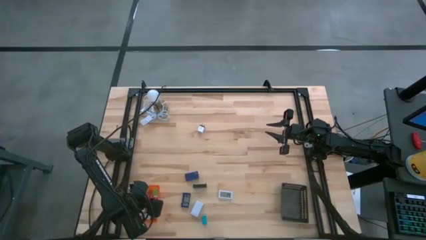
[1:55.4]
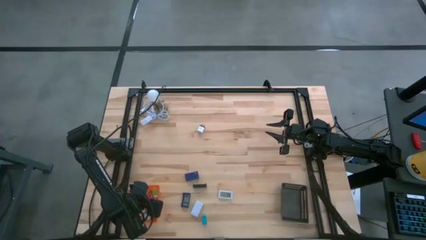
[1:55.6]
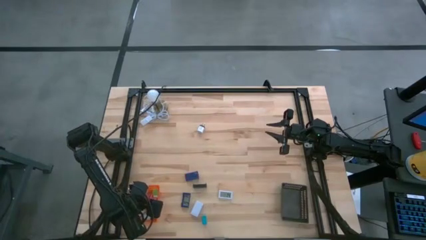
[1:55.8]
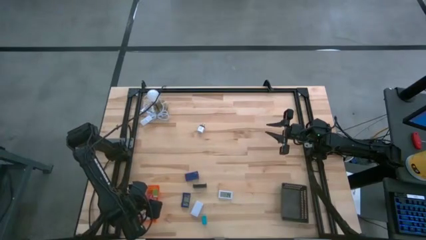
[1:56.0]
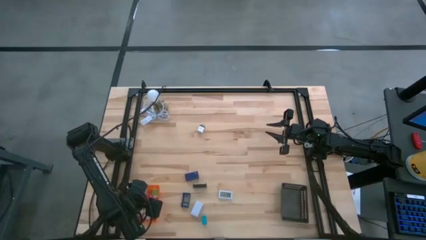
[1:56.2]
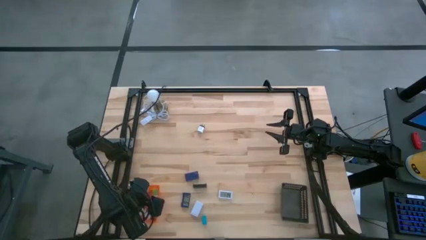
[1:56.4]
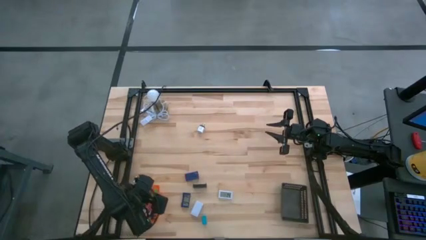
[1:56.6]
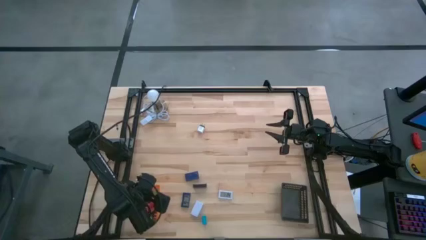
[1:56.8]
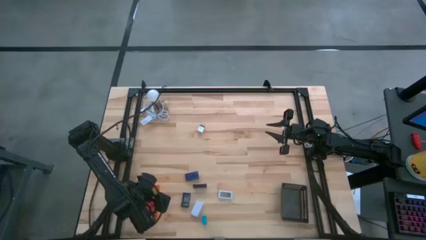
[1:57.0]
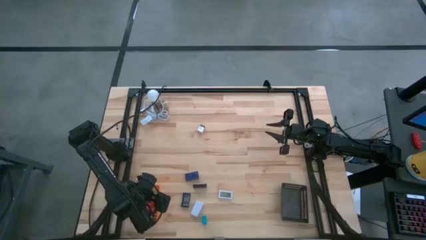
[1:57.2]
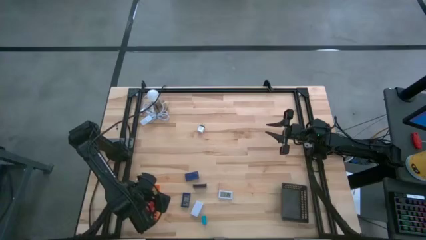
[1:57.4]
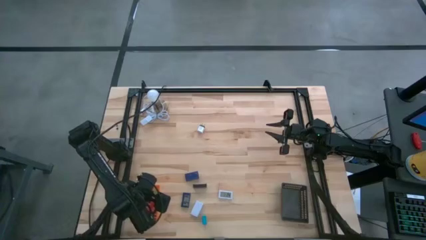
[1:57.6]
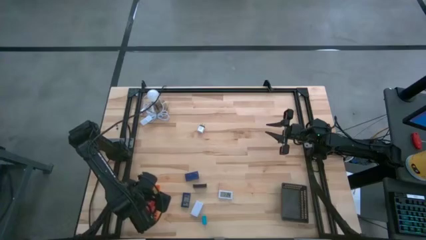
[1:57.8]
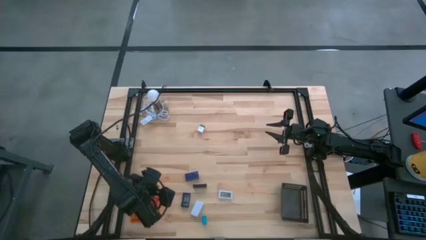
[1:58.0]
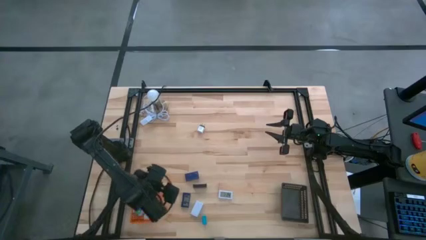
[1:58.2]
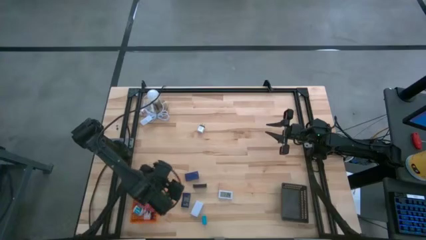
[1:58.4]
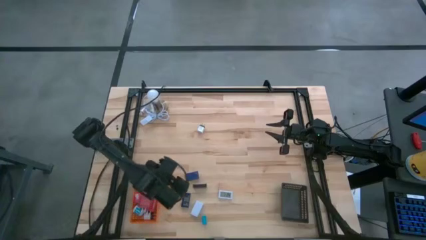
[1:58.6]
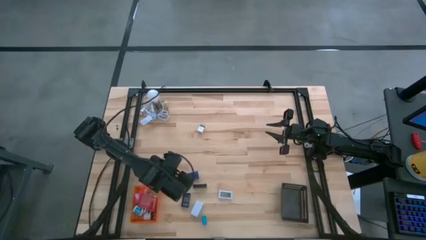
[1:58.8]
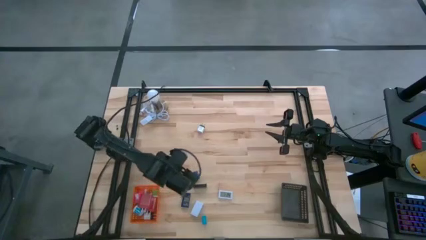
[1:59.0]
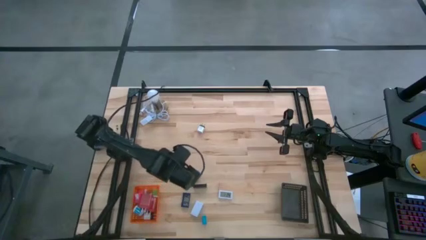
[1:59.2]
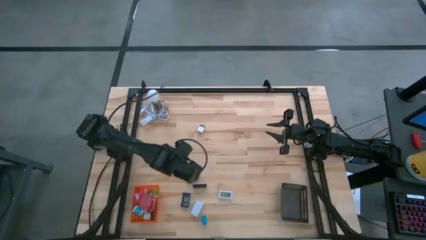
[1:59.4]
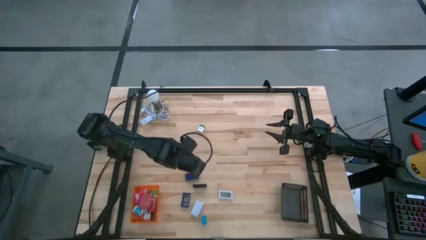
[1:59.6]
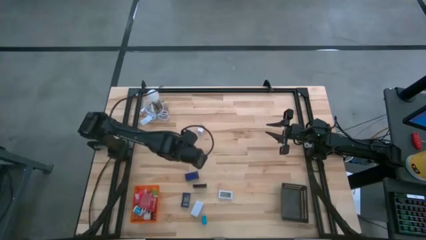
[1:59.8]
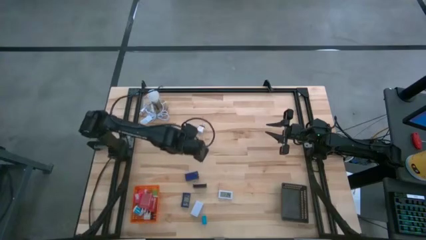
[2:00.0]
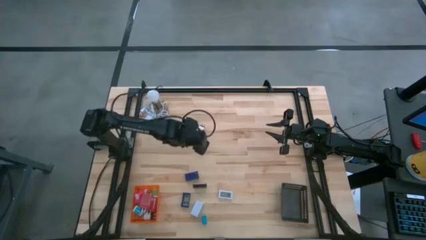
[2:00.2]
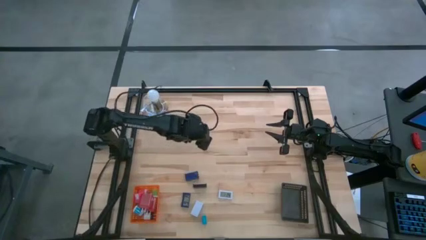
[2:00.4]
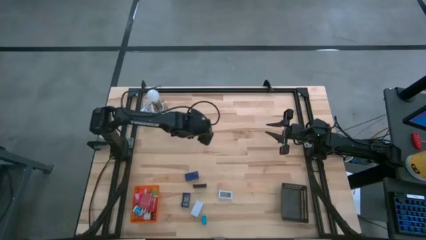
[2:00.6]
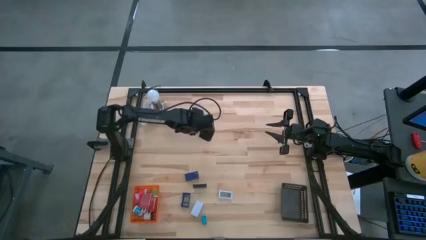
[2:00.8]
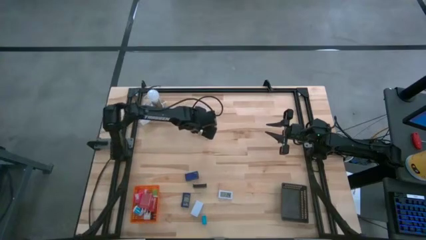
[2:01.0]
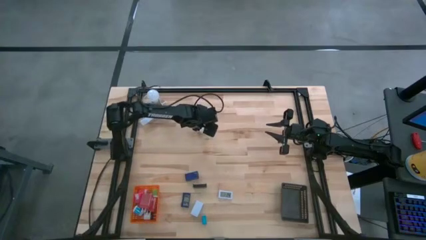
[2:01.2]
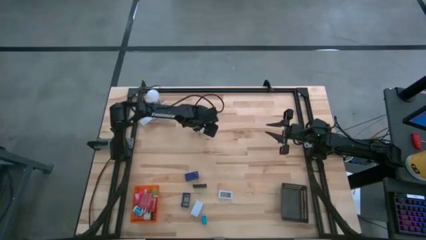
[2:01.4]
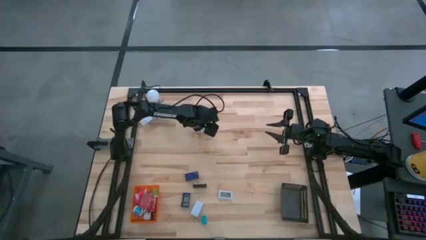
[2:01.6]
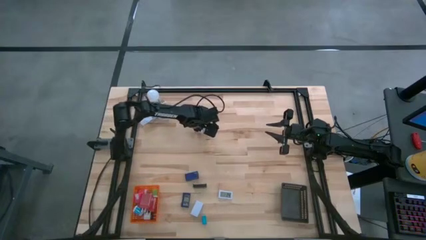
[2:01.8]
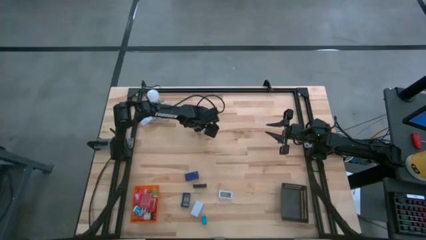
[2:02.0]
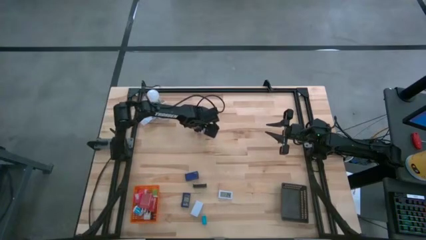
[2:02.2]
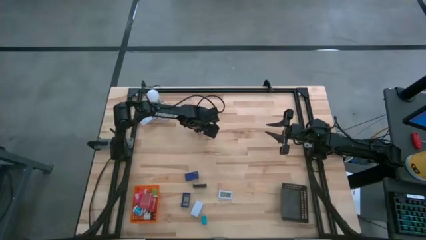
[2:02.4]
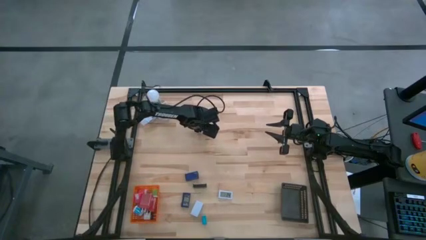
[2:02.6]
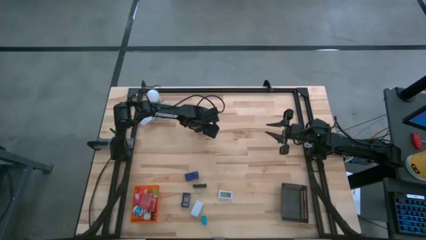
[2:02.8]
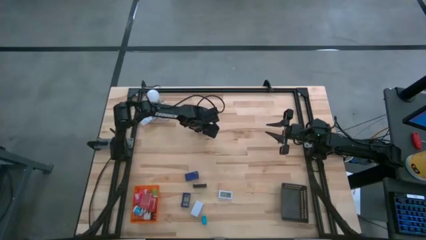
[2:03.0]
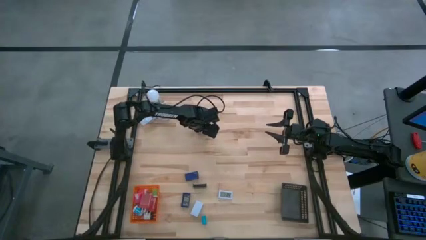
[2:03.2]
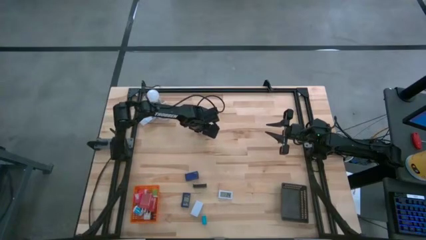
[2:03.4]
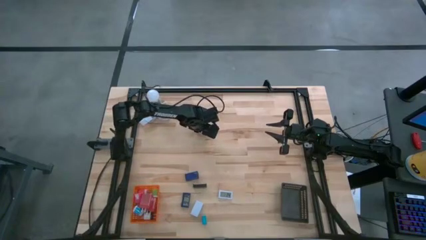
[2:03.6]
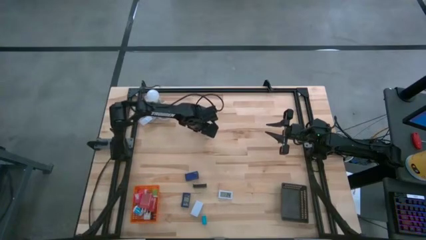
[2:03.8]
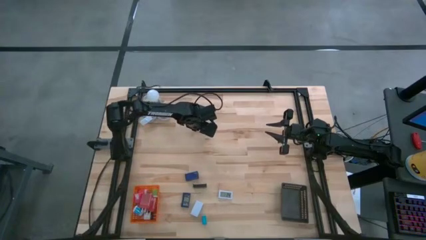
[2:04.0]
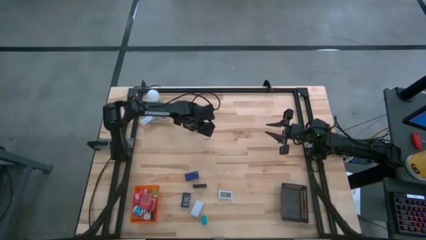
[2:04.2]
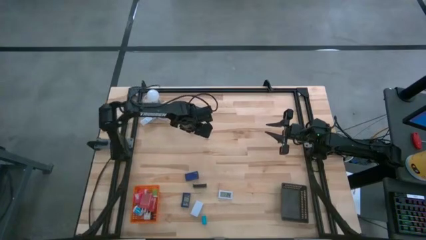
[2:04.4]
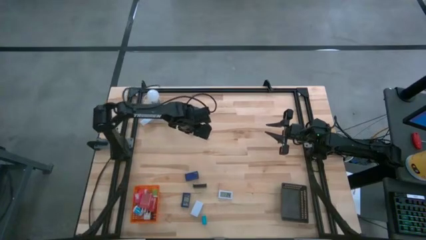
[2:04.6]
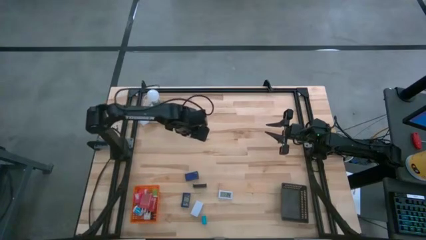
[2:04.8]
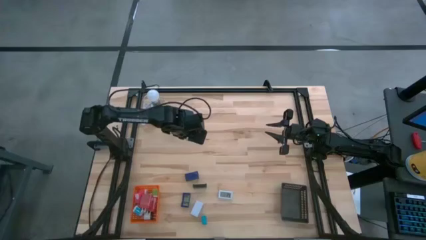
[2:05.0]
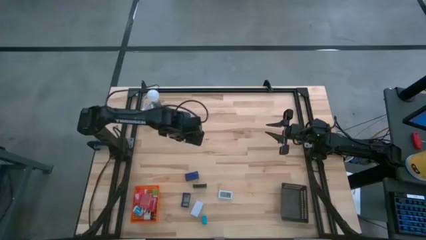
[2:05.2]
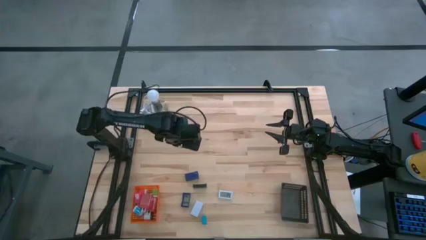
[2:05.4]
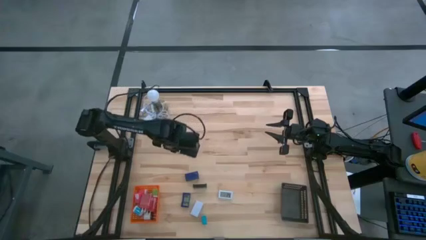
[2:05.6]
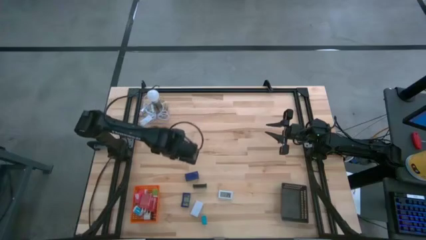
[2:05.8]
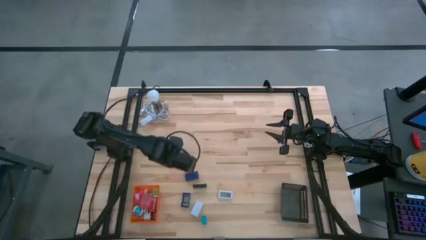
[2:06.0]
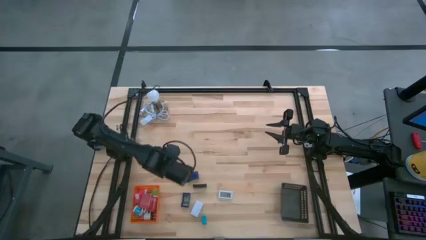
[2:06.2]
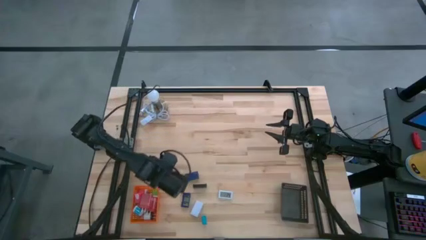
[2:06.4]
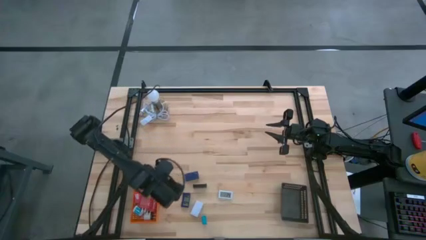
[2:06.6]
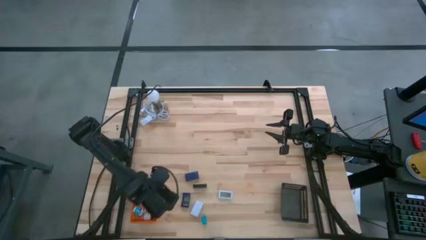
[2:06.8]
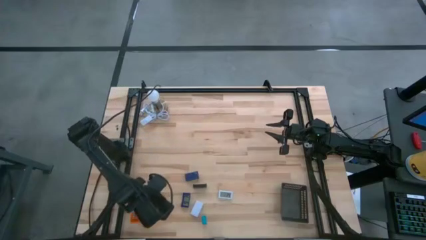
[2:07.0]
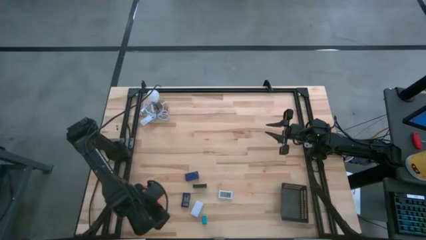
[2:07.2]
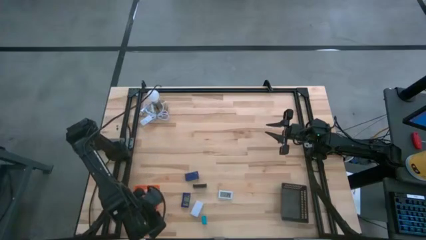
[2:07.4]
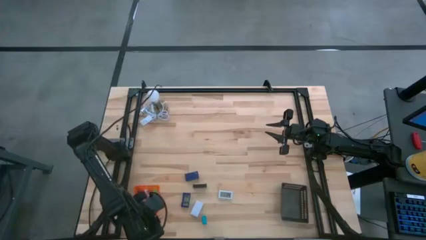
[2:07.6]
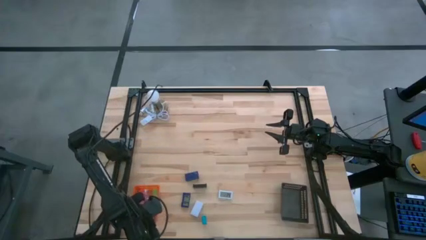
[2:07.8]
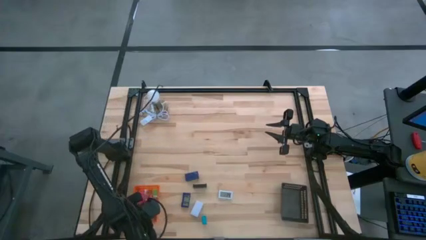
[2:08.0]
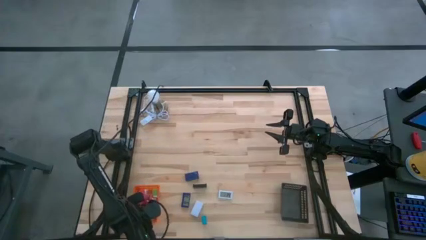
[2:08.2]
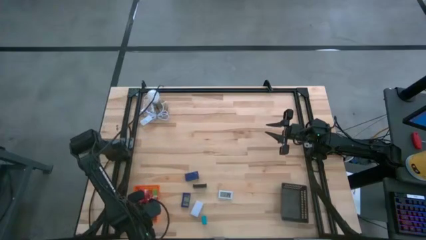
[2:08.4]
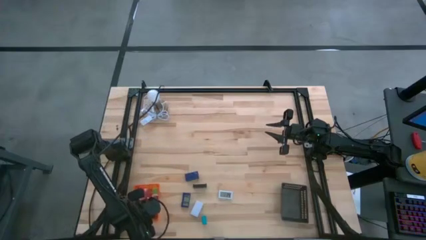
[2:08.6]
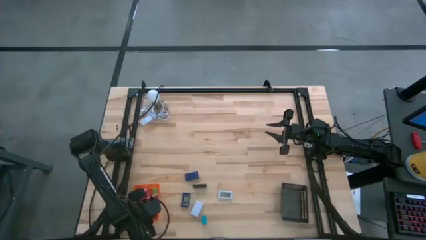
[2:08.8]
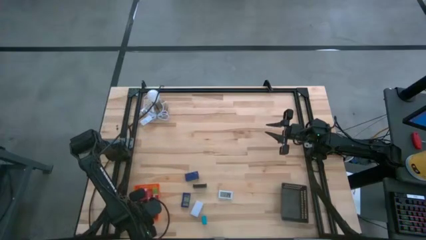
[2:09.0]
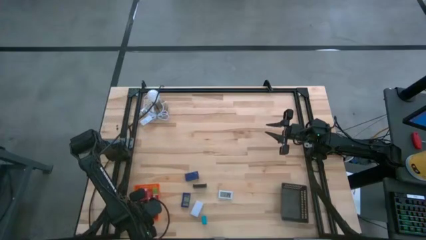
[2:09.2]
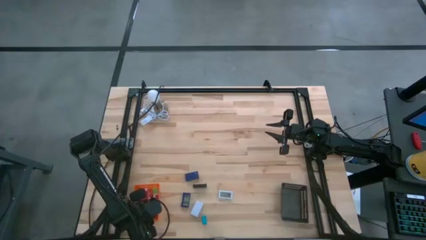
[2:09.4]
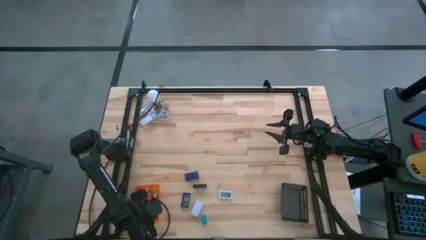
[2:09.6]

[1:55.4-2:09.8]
Task: Pick & Place Office items
Put the white black charger adapter into the orange bin
